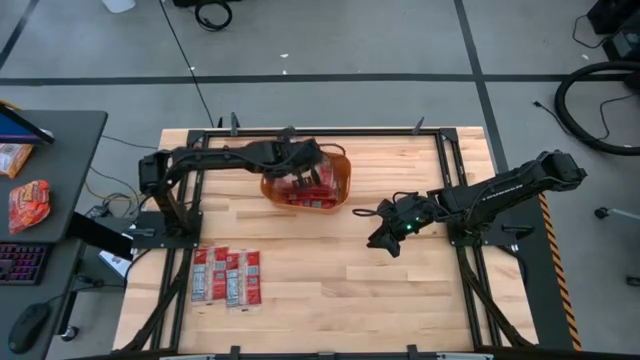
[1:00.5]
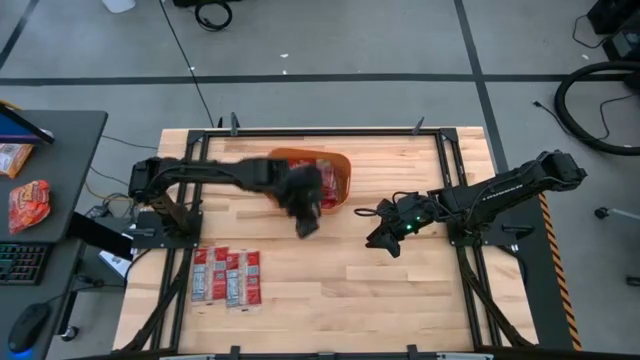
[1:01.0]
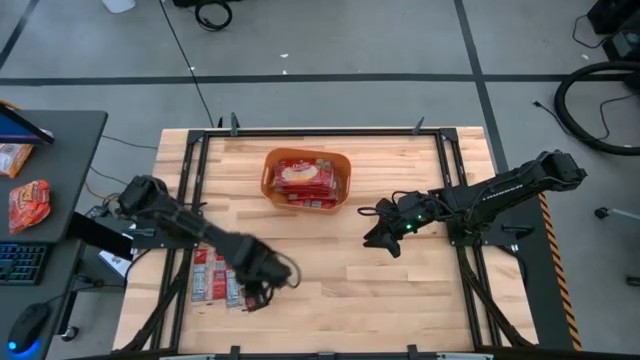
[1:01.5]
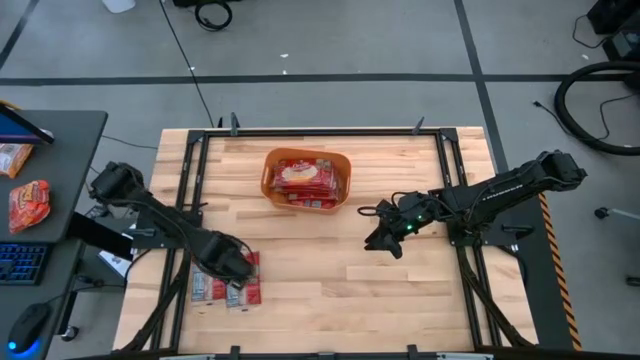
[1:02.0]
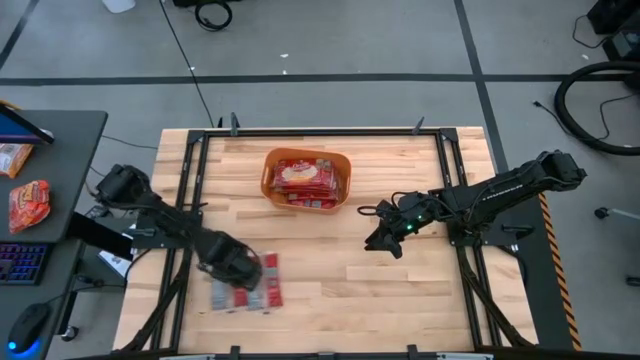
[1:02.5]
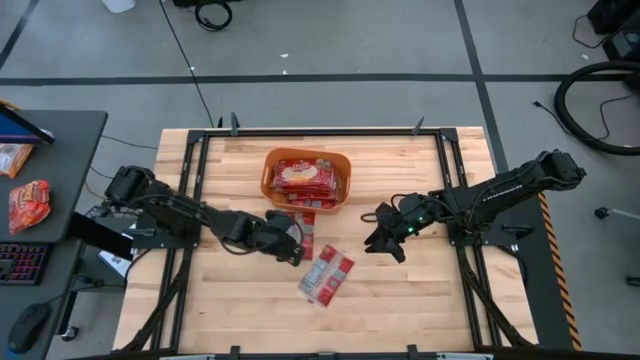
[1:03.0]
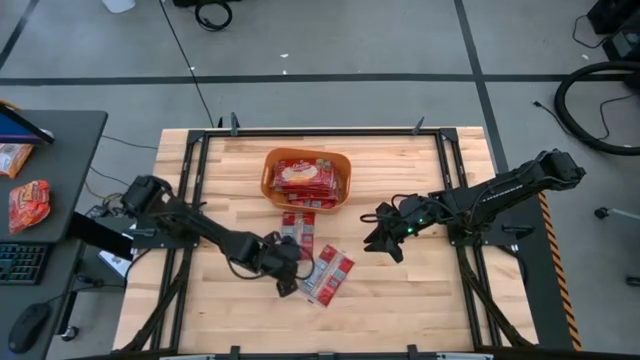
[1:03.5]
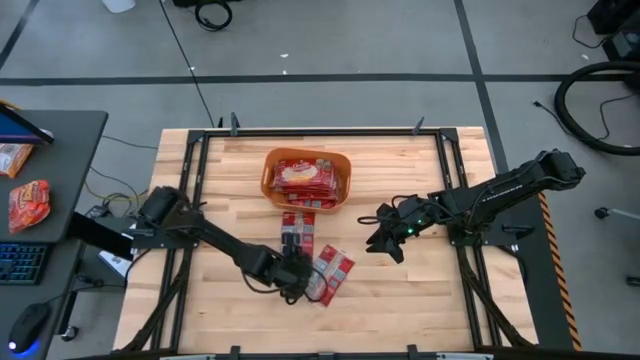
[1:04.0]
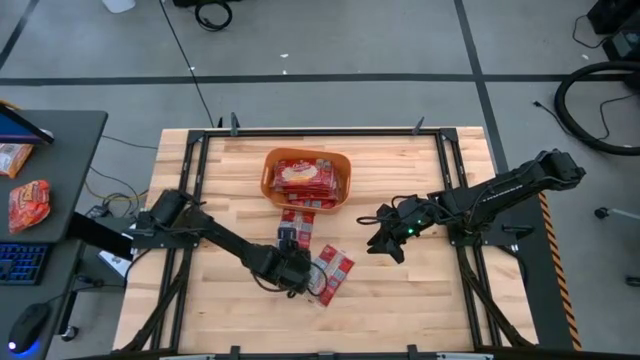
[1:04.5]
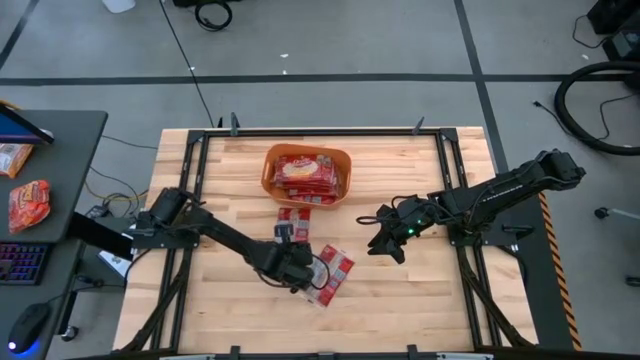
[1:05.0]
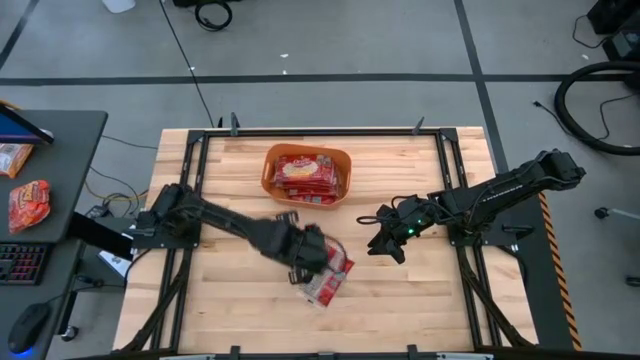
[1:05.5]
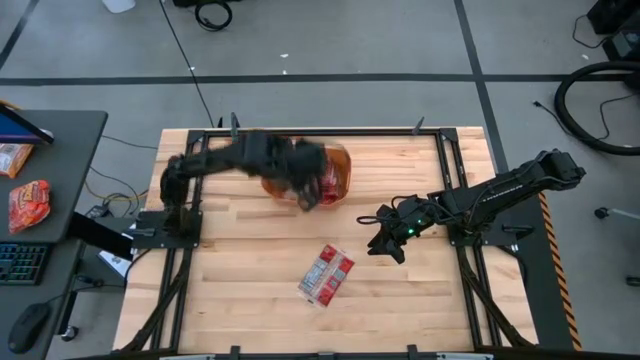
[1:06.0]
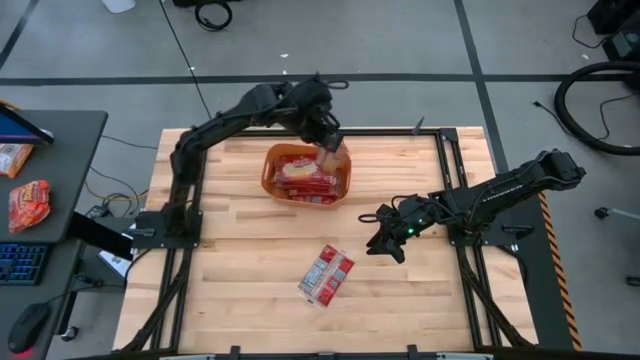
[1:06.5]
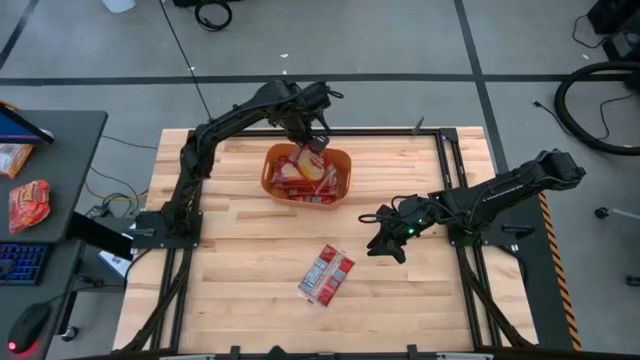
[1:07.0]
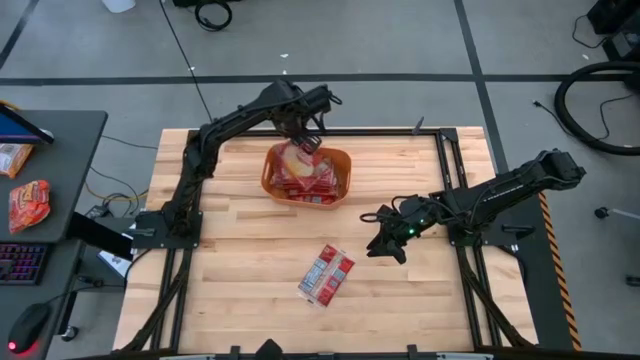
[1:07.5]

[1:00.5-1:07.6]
Task: Sort popcorn bags into baskets
Put the red popcorn bag into the orange bin

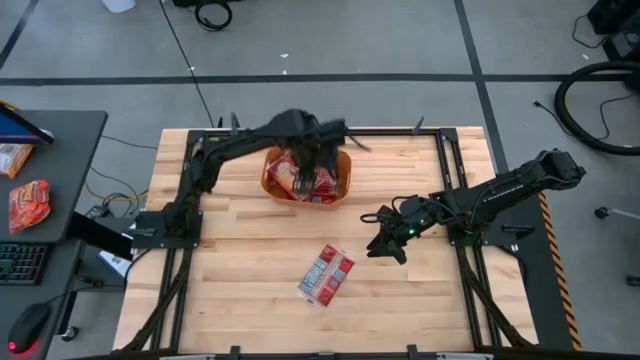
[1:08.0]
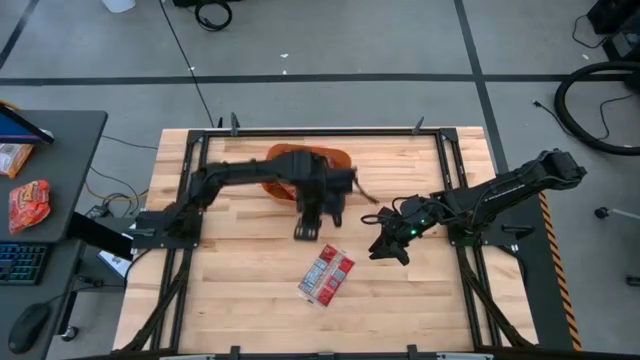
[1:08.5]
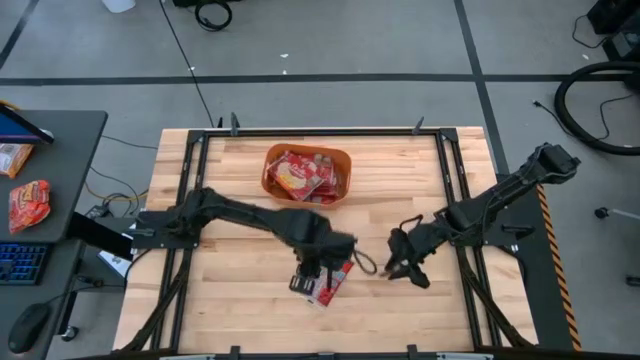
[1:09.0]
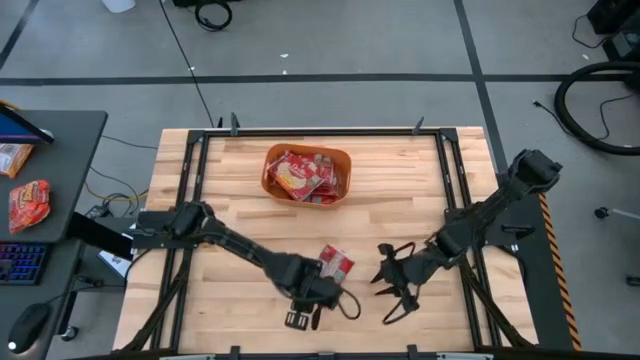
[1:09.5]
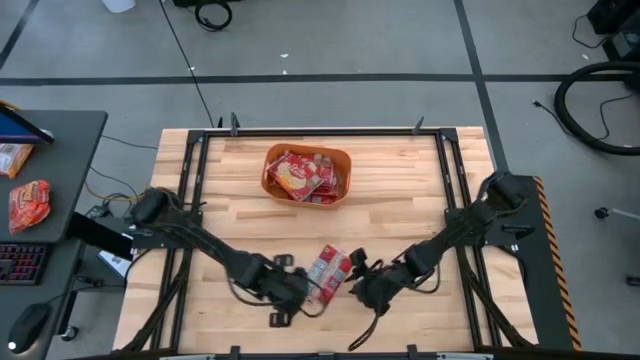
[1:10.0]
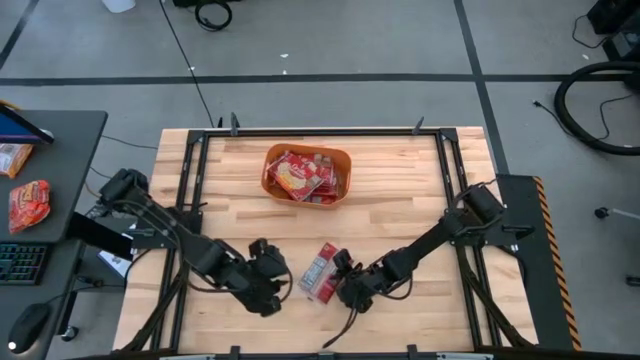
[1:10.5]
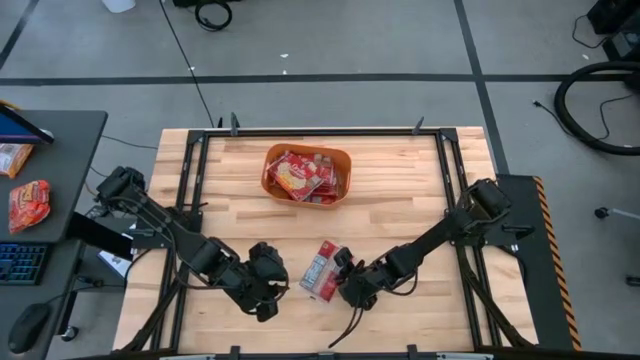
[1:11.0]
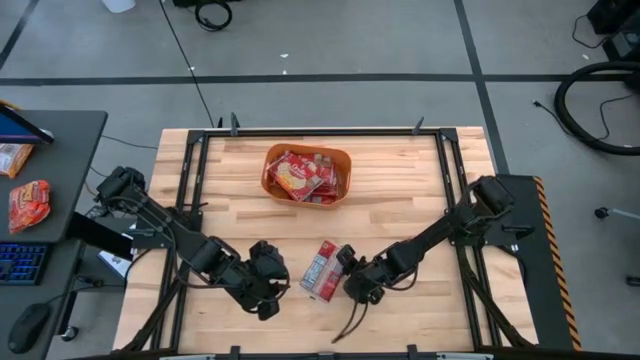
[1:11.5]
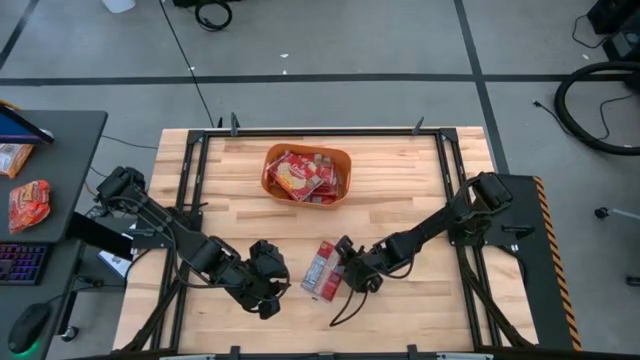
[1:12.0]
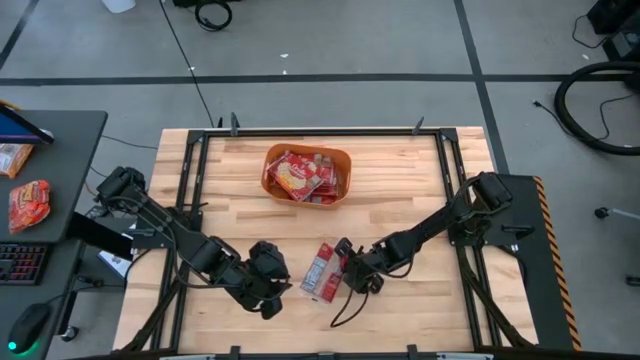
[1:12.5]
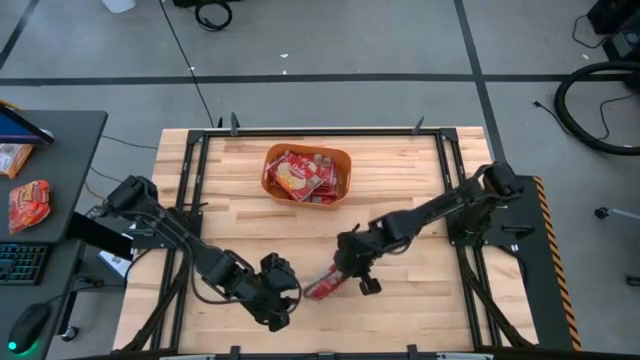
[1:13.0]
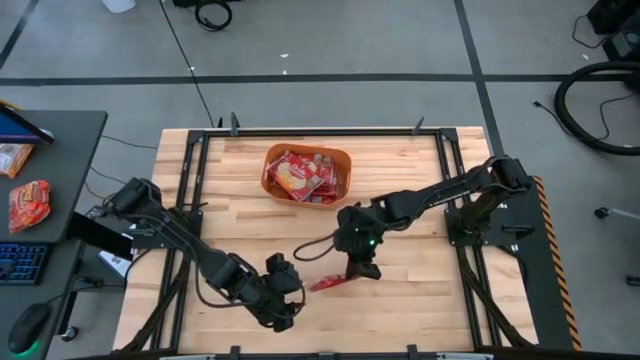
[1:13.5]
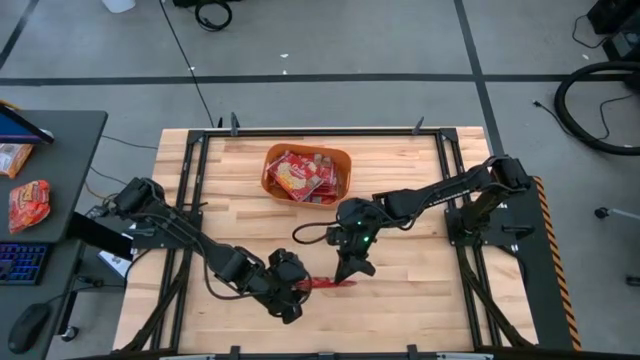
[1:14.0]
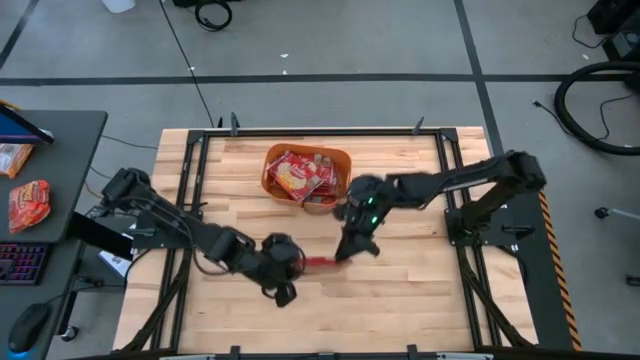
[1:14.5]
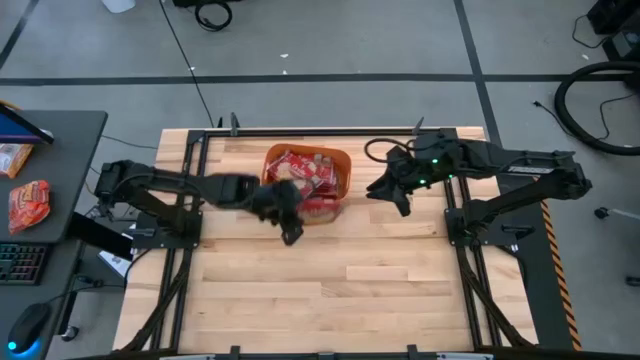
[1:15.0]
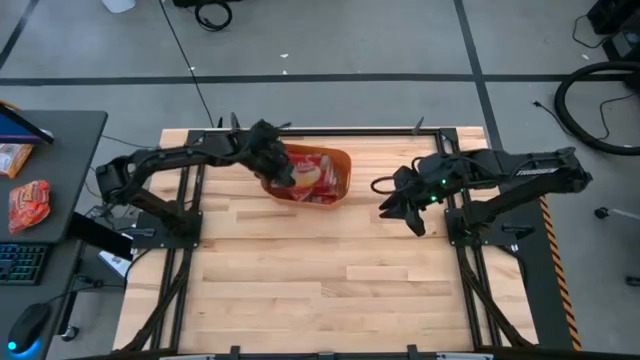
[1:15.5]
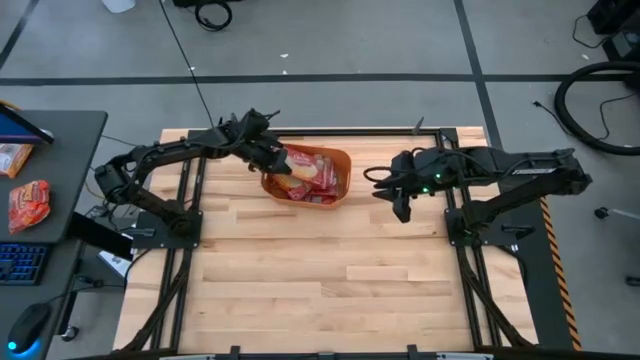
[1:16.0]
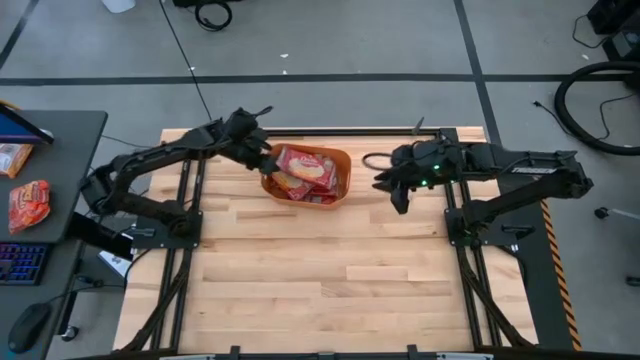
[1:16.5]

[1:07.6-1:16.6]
Put the red popcorn bag into the orange bin

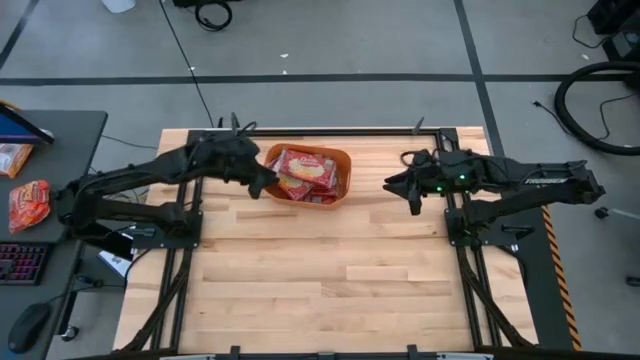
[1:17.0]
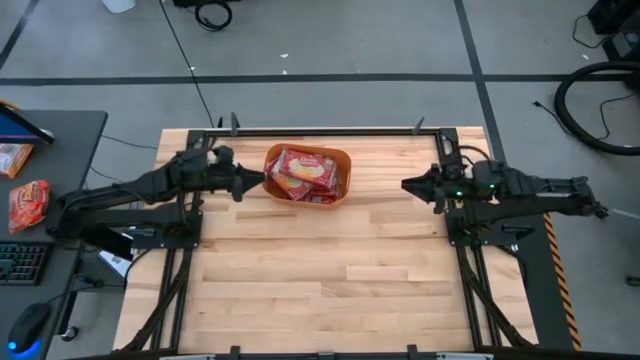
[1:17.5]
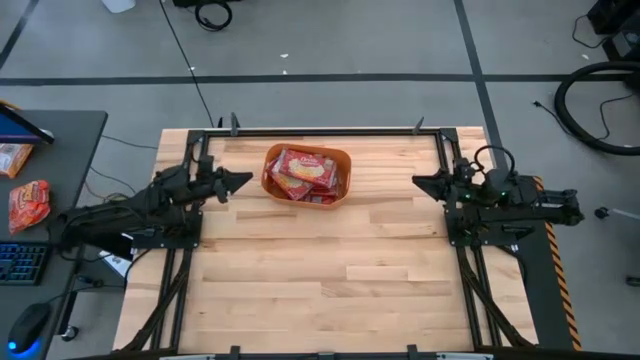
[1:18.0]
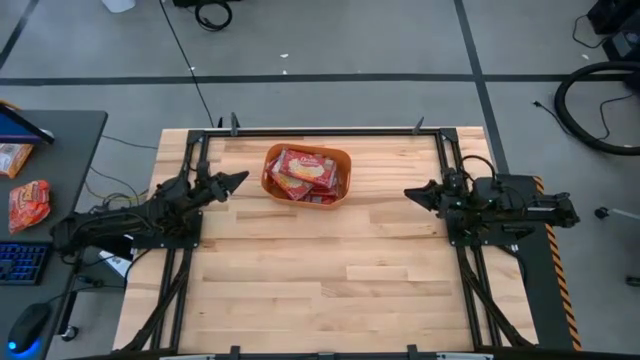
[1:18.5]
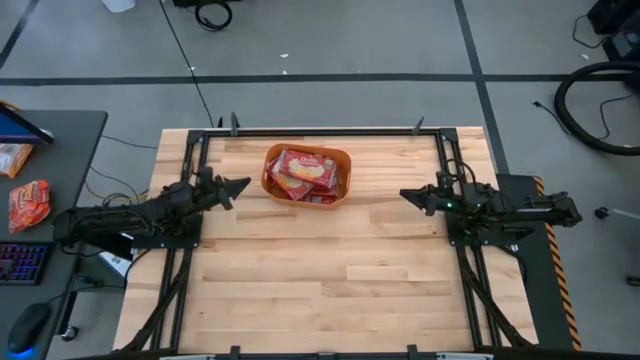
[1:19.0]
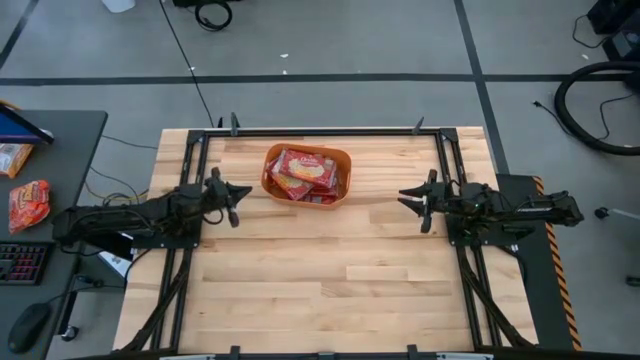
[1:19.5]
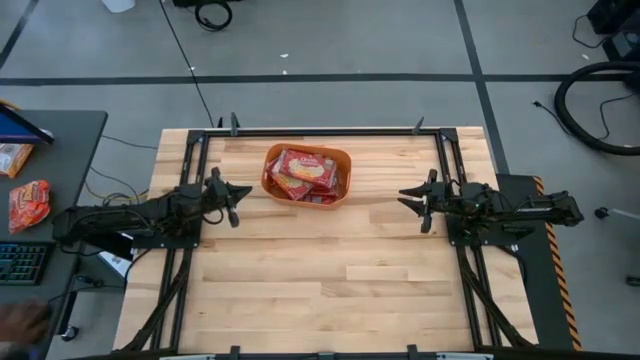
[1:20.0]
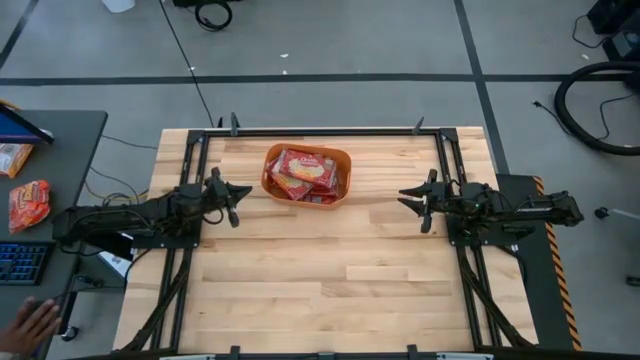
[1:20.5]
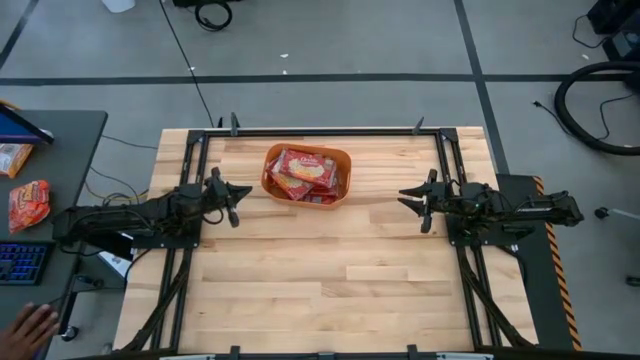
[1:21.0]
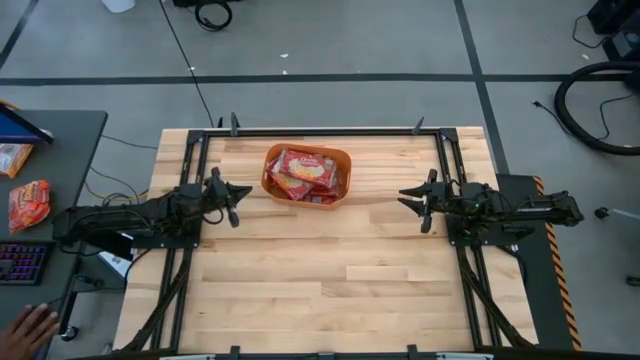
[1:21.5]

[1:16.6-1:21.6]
Return to Home Position
